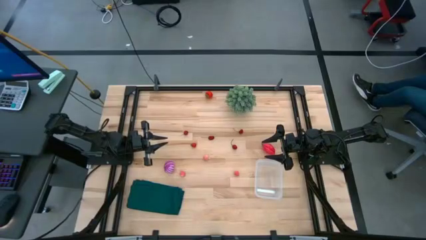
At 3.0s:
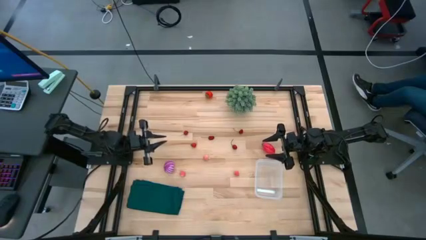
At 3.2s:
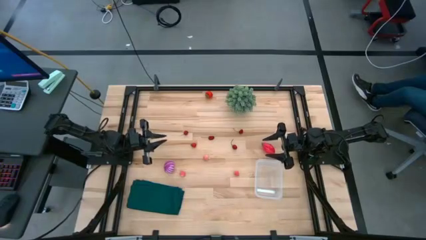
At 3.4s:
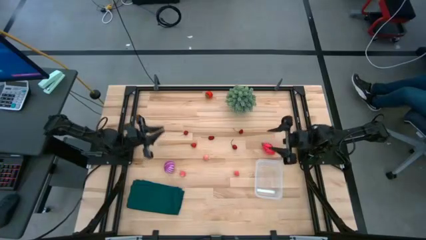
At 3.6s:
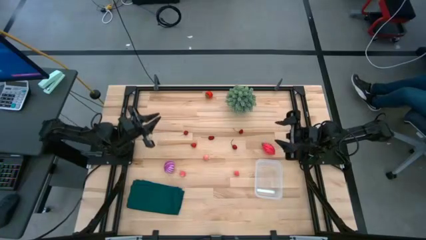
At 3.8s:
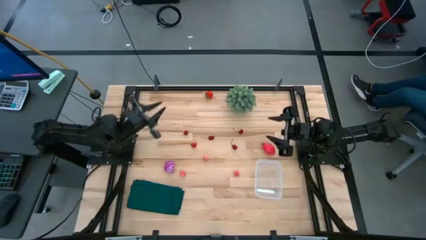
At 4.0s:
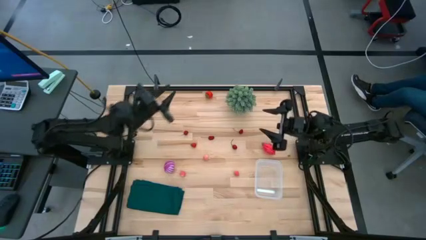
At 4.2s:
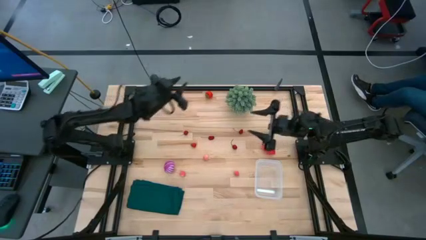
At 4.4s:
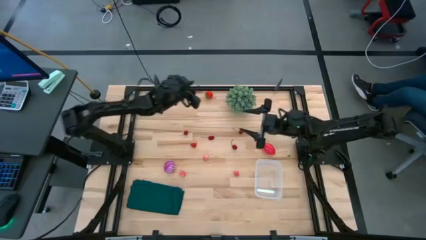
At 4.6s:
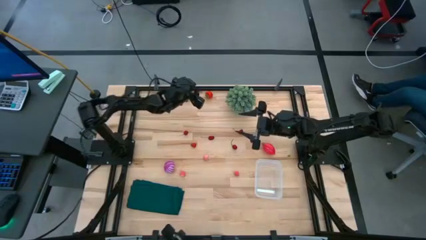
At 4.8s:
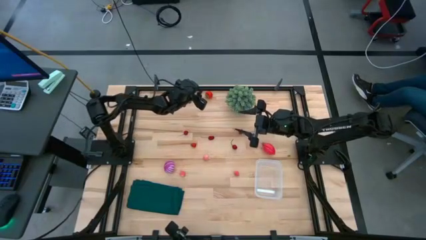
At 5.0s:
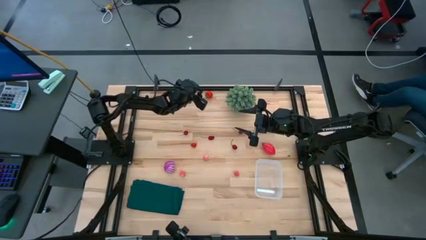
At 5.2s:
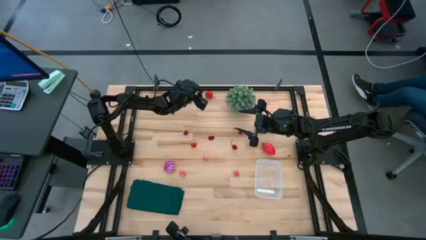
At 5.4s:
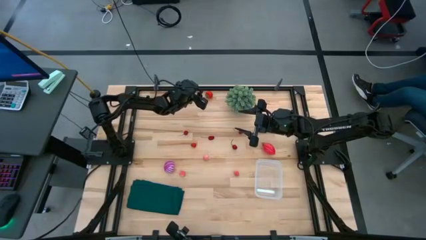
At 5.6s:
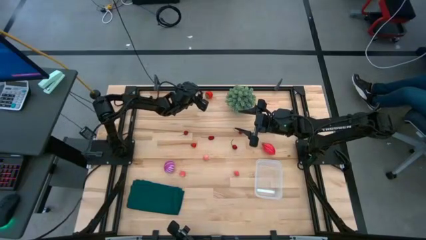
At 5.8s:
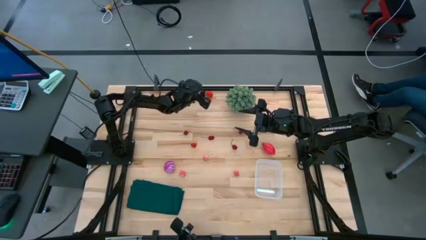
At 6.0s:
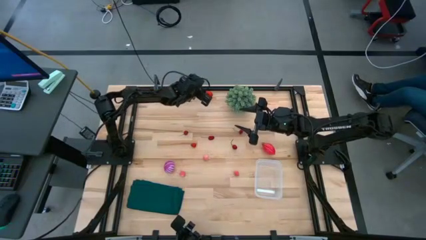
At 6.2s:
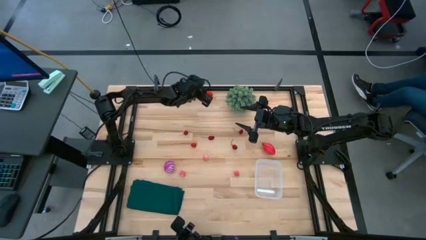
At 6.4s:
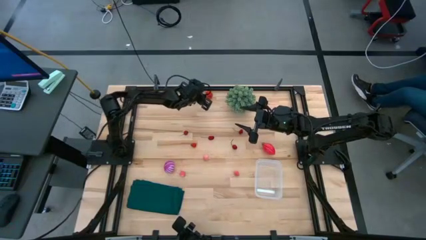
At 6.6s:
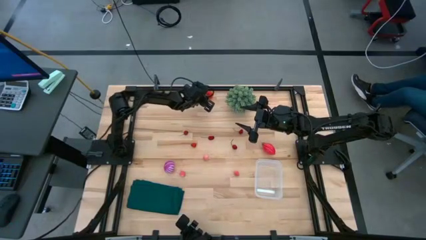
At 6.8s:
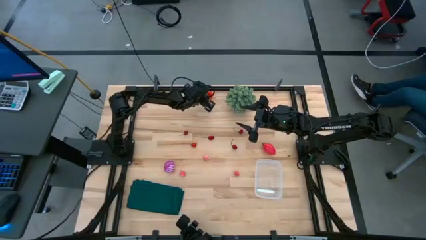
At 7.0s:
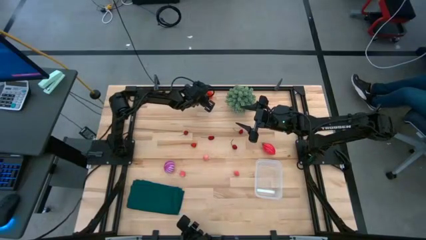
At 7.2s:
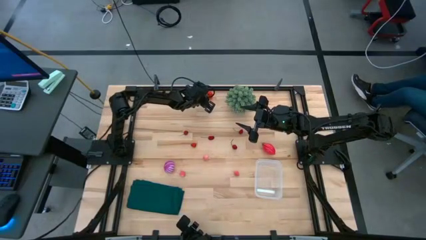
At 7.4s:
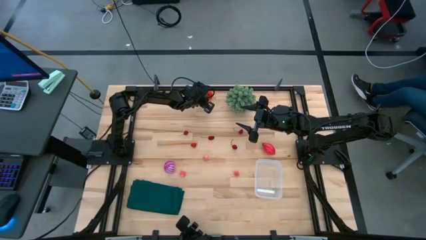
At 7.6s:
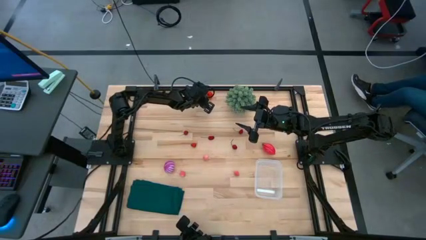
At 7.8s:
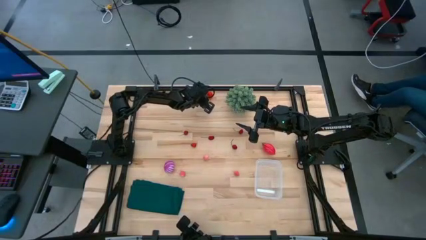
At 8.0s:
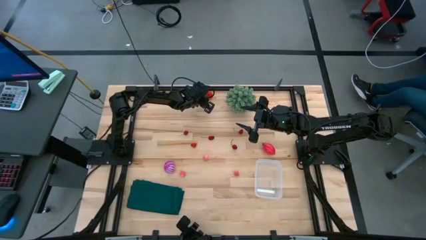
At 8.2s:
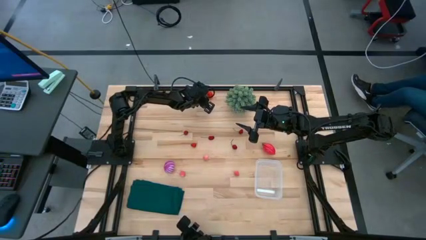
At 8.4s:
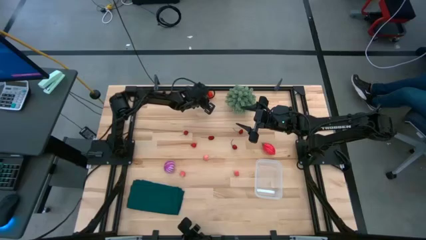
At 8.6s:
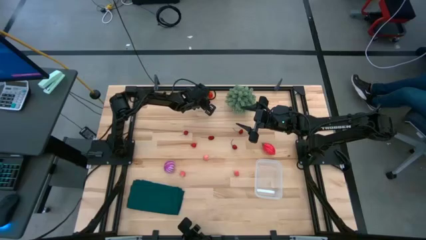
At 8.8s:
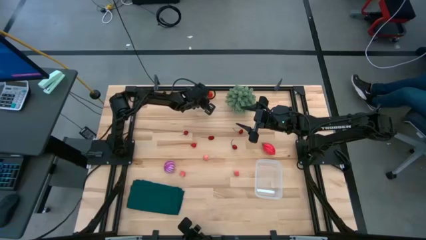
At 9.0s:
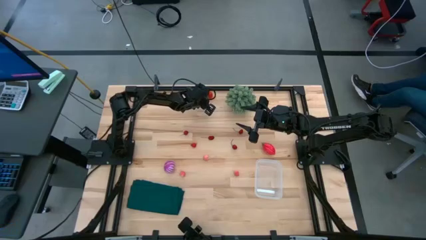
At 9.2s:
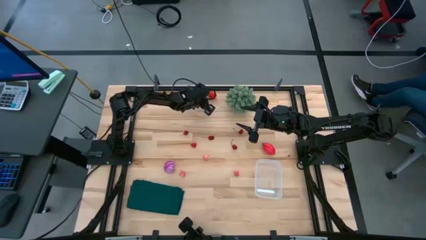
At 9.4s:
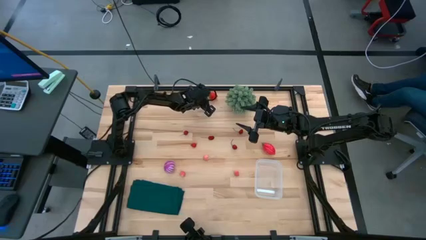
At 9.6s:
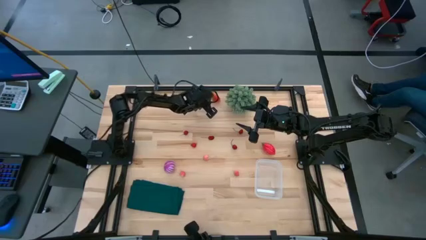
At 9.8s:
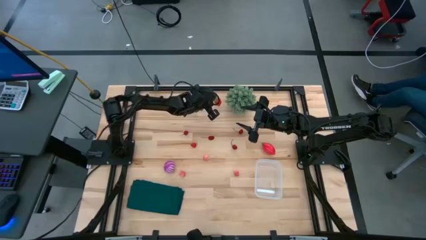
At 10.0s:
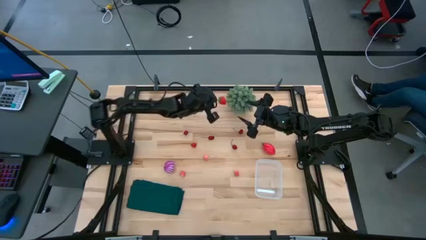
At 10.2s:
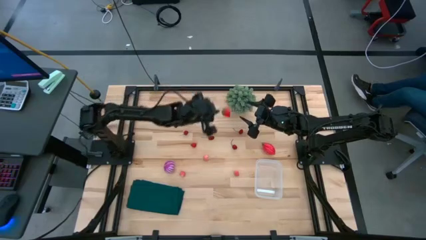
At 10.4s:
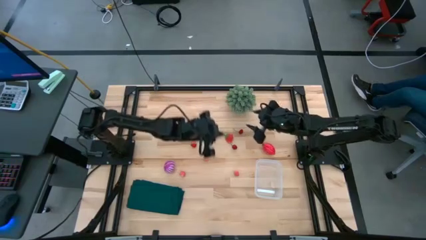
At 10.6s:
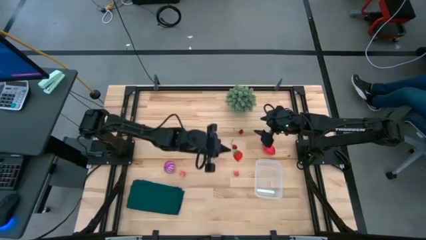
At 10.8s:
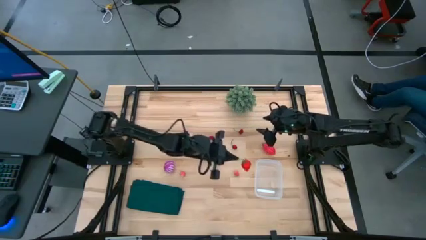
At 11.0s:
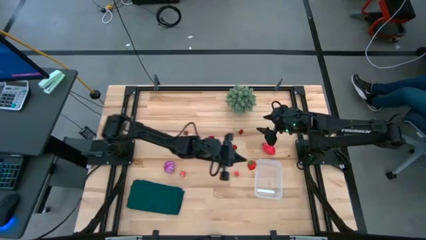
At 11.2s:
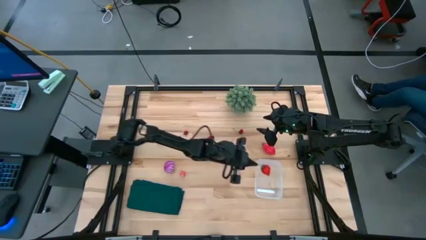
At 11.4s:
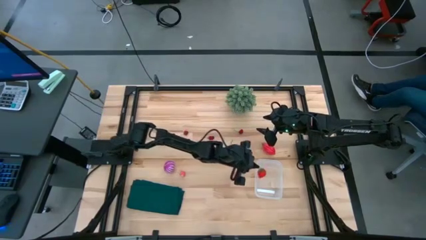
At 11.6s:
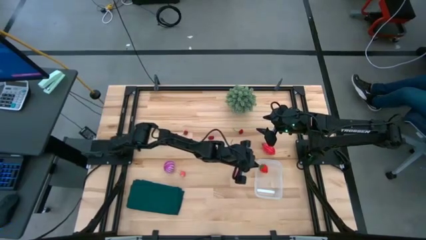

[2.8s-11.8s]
Task: Pick and placing Produce into tupperware
Put the red strawberry into the transparent bin

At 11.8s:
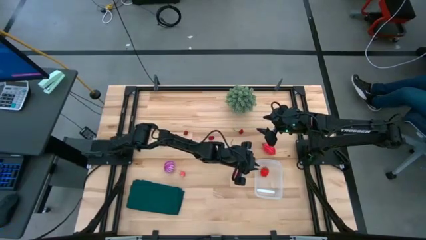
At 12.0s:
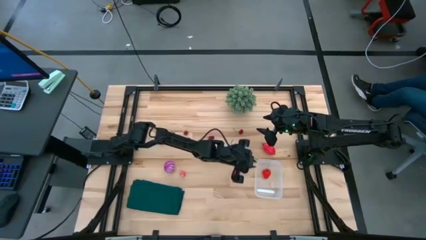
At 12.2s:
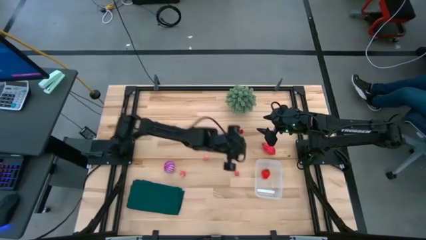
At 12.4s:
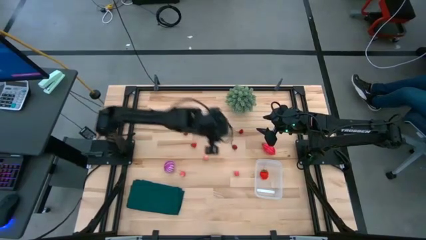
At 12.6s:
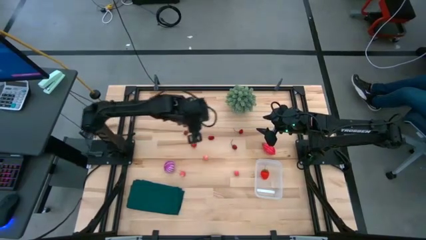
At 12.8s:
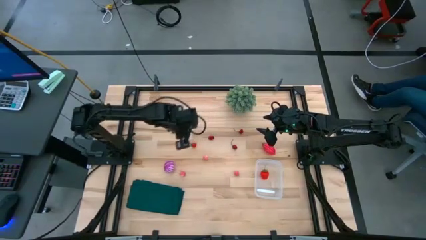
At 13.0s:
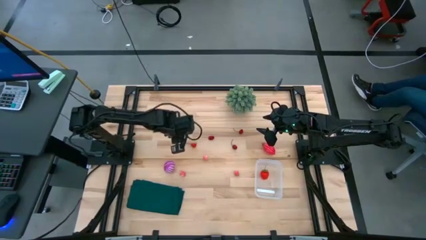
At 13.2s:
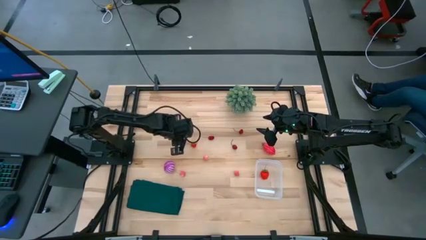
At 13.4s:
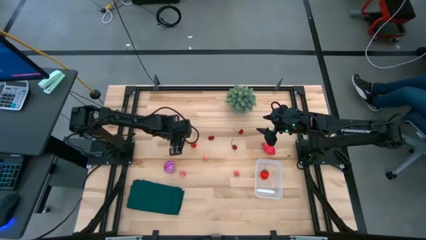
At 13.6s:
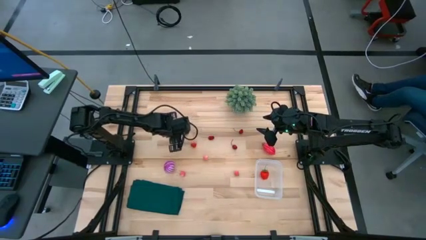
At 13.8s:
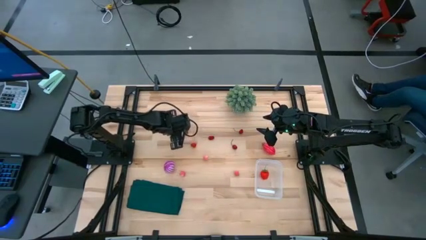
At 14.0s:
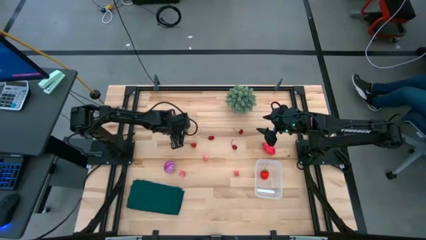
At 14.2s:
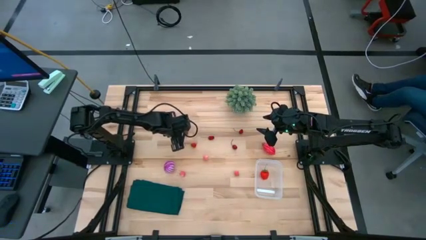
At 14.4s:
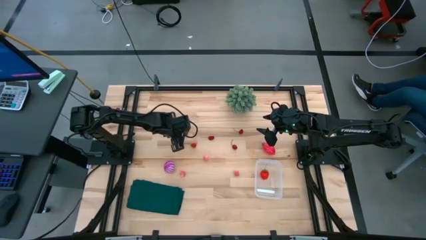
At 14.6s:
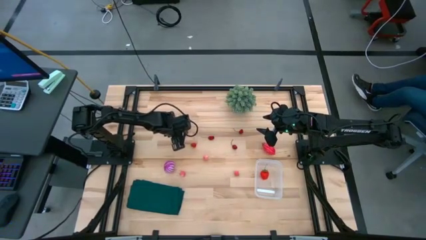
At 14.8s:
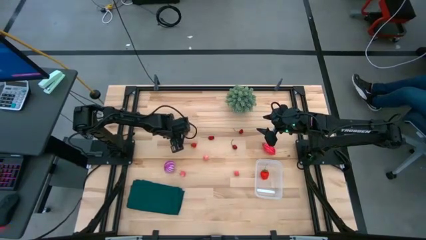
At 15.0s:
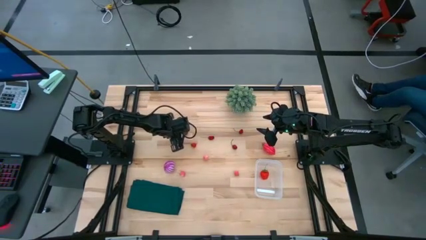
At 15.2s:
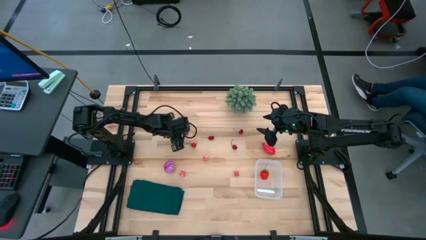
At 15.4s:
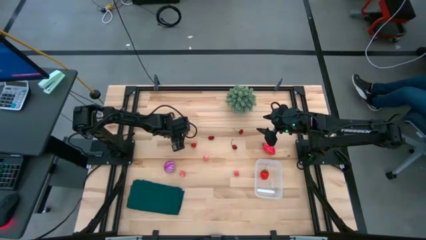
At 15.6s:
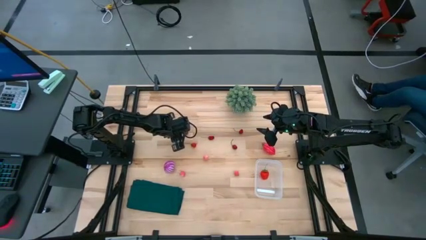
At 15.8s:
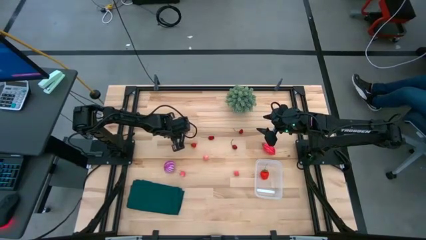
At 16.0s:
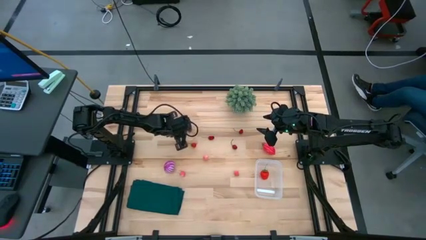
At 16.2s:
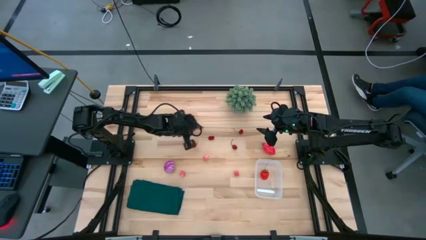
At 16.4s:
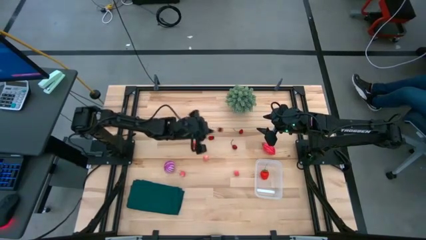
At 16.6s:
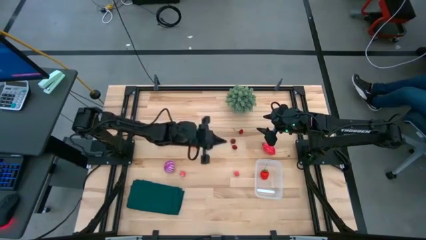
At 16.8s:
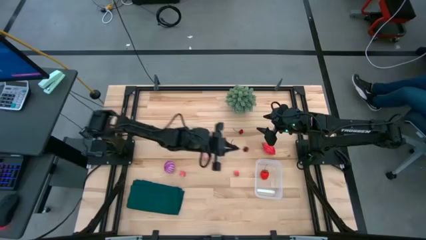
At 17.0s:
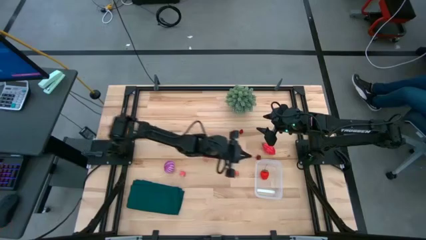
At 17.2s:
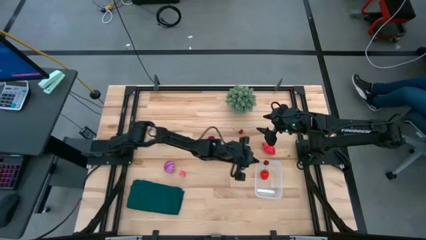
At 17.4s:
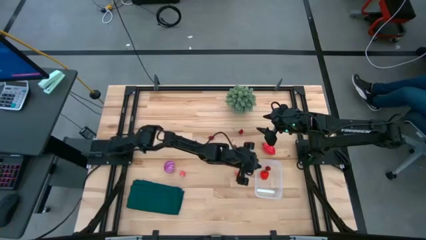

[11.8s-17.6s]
Put the red cherry into the transparent bin

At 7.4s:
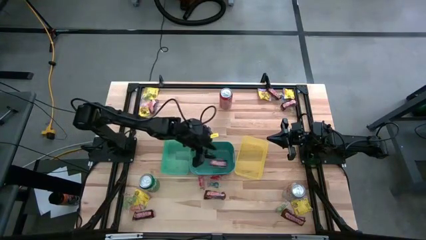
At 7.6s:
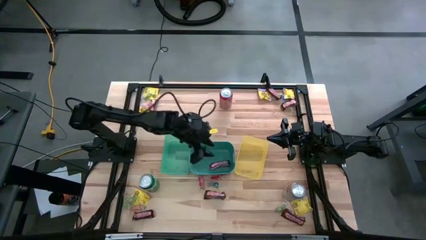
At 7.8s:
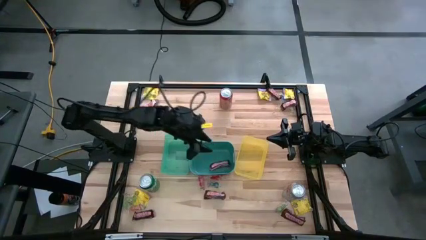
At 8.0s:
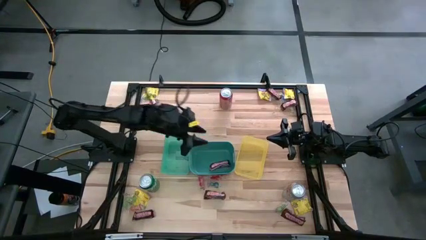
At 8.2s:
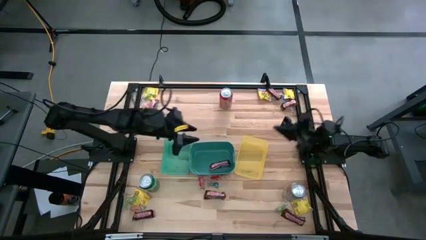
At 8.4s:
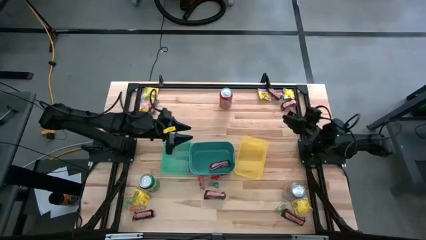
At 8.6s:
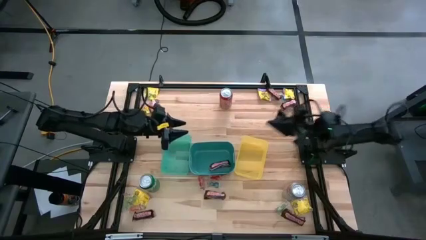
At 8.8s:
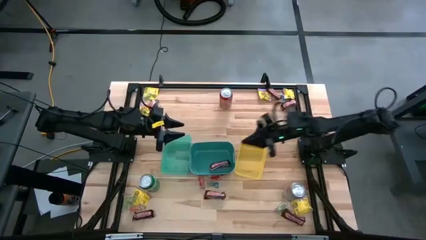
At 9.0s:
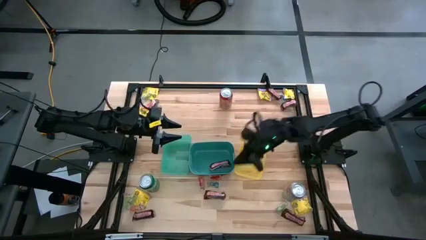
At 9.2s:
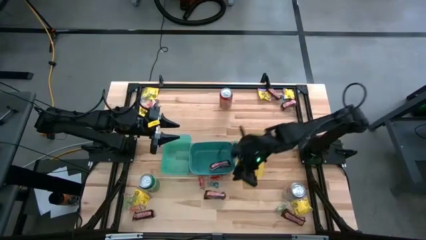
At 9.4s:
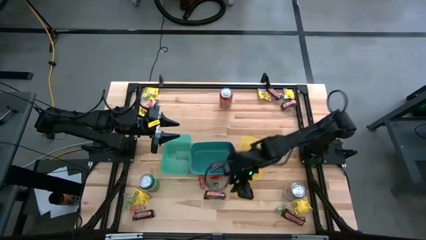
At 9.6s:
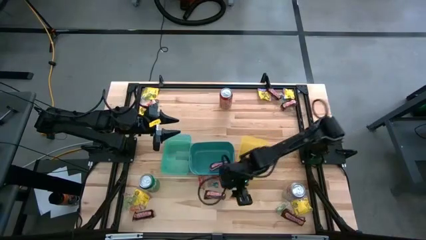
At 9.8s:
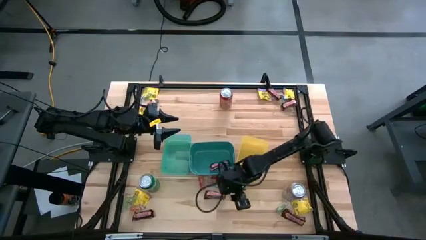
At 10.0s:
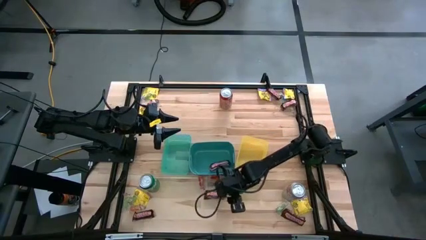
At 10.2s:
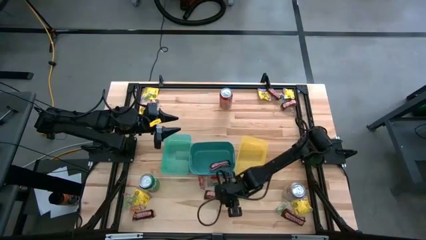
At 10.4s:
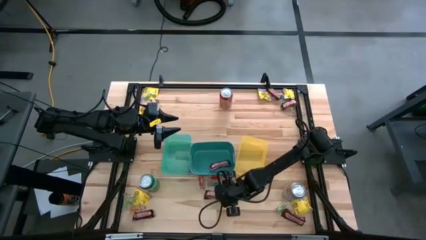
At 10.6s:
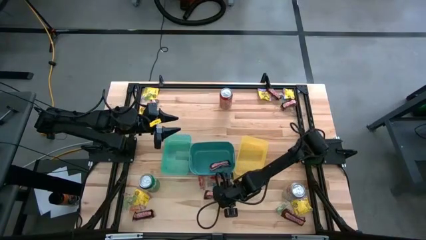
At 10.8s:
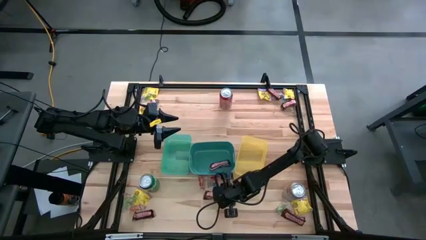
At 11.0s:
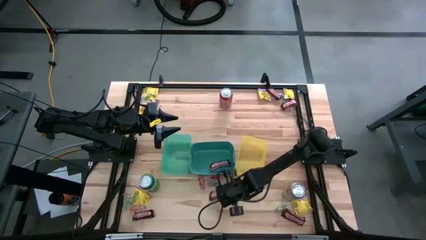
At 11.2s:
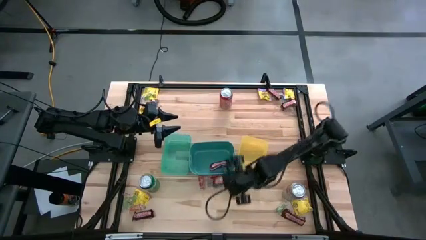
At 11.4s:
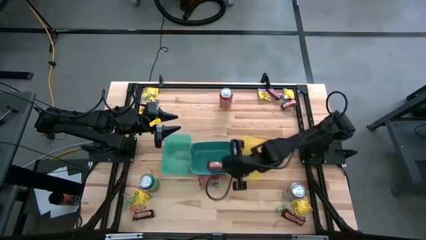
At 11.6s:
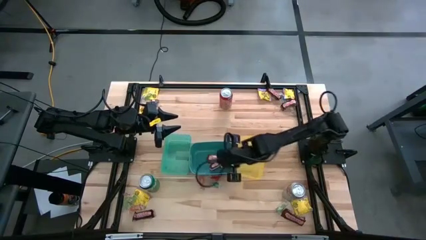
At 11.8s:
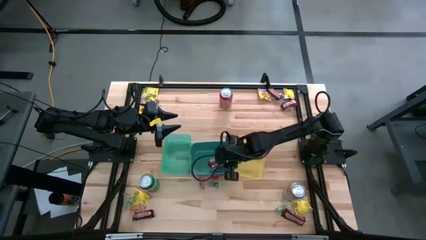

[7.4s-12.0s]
Task: Sort candy
Put the chocolate bar into the blue bin
